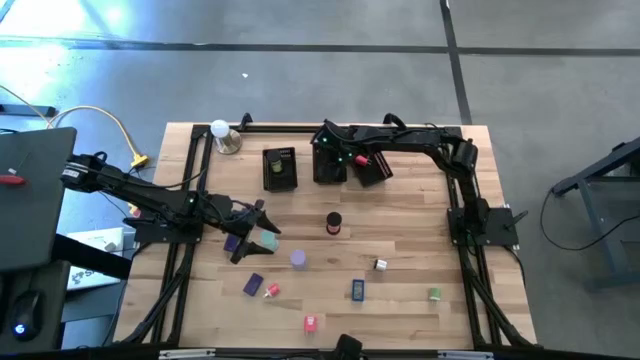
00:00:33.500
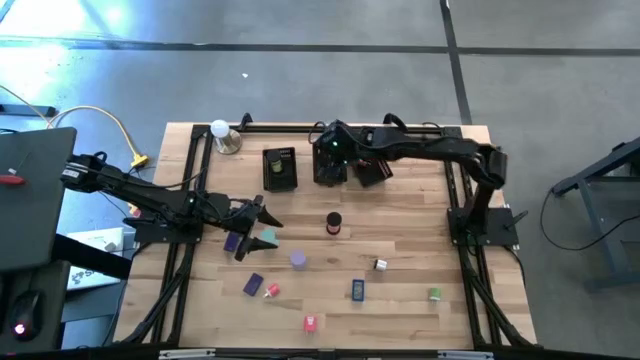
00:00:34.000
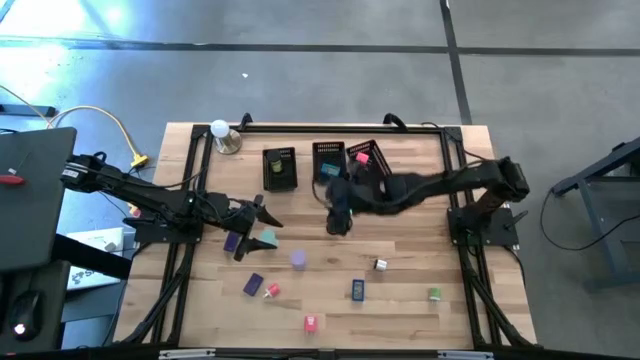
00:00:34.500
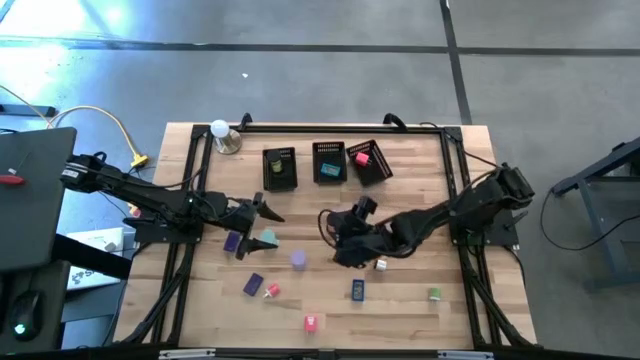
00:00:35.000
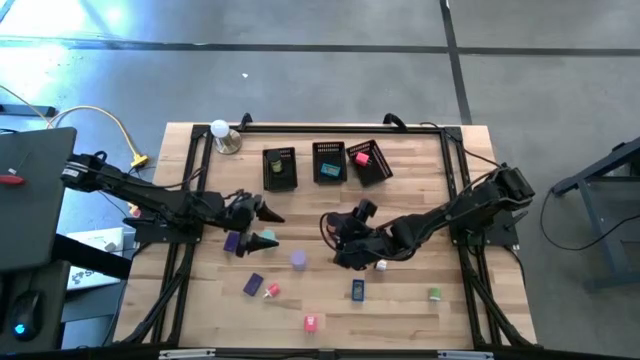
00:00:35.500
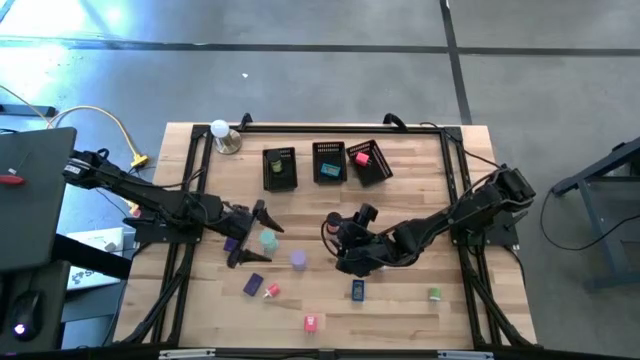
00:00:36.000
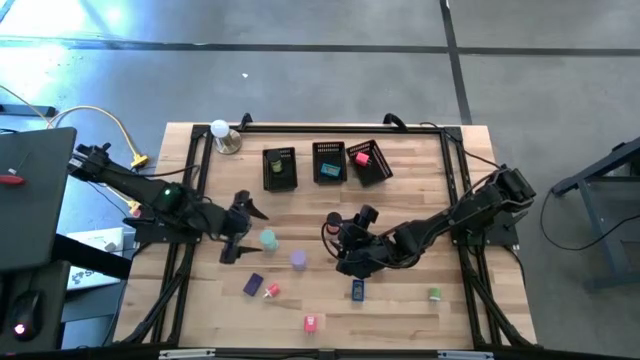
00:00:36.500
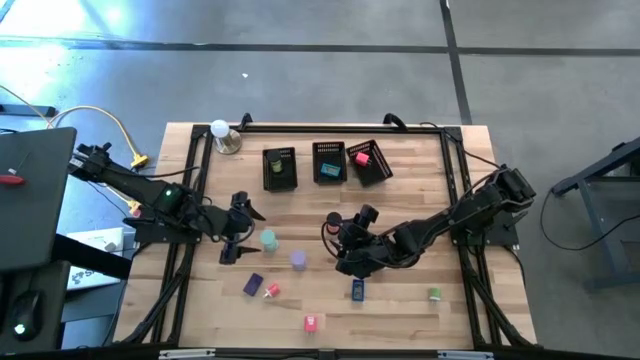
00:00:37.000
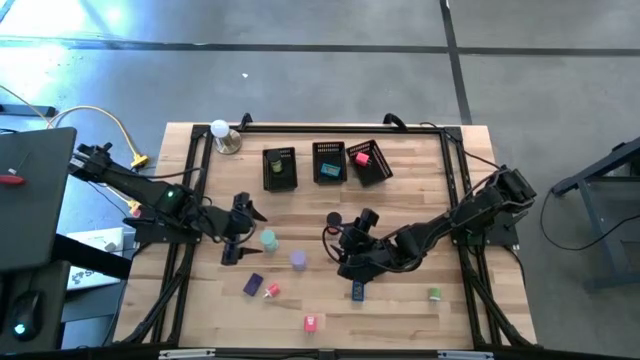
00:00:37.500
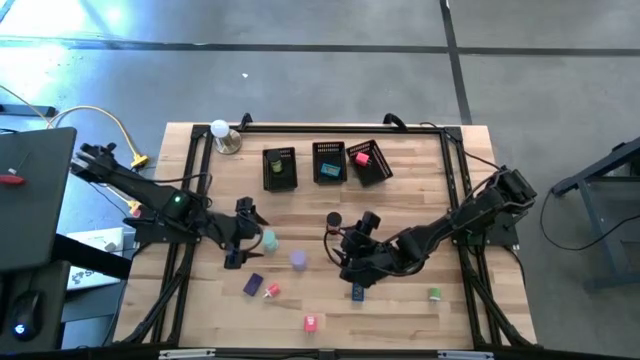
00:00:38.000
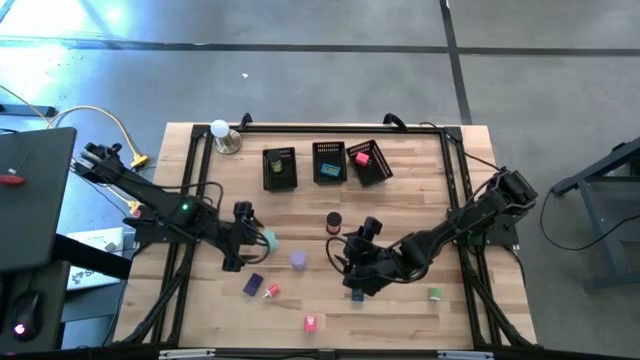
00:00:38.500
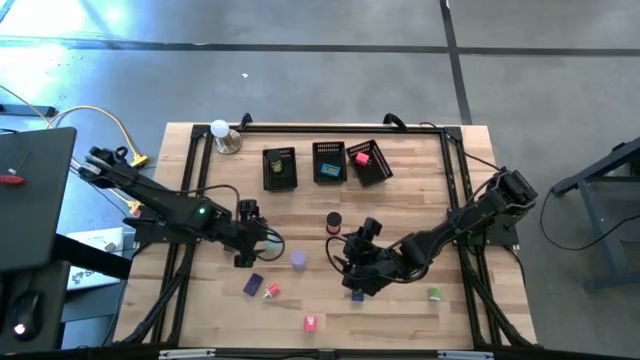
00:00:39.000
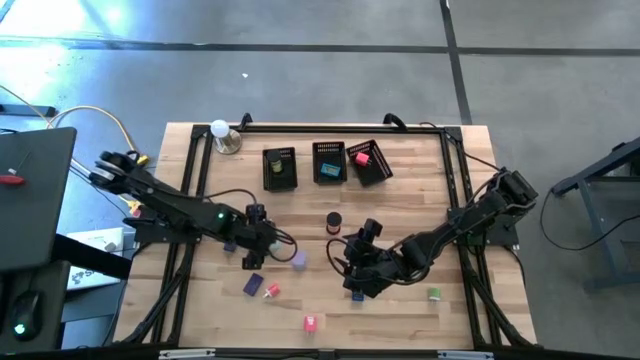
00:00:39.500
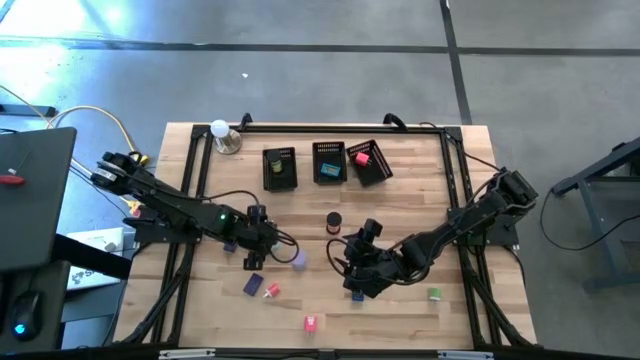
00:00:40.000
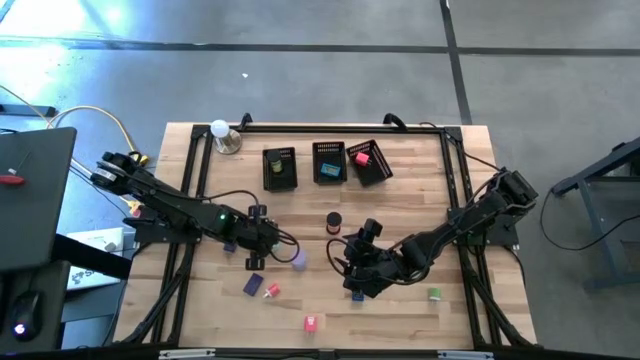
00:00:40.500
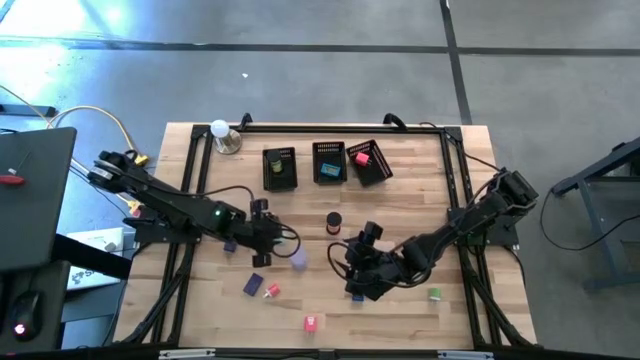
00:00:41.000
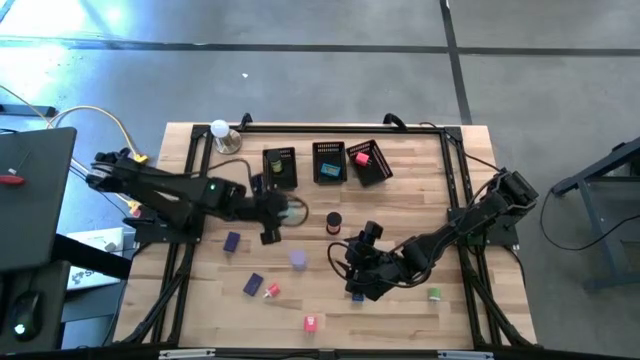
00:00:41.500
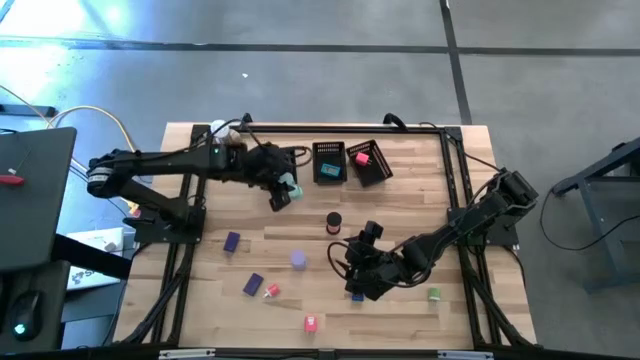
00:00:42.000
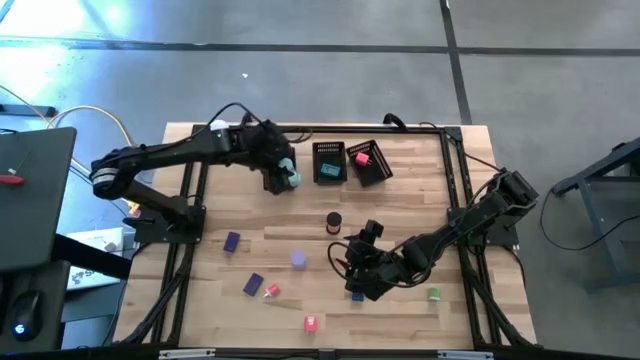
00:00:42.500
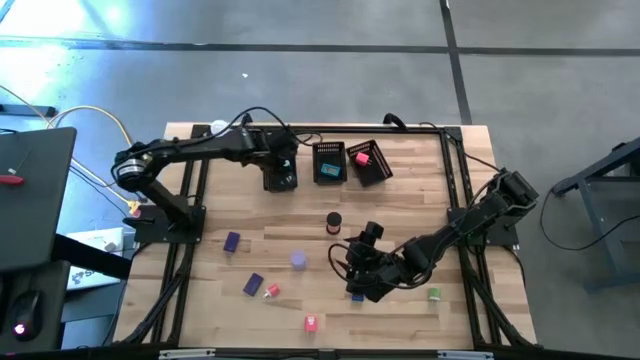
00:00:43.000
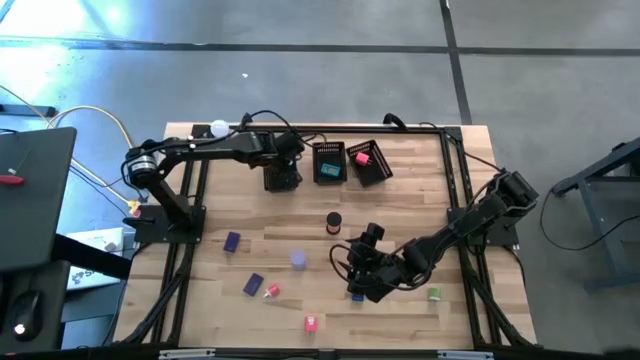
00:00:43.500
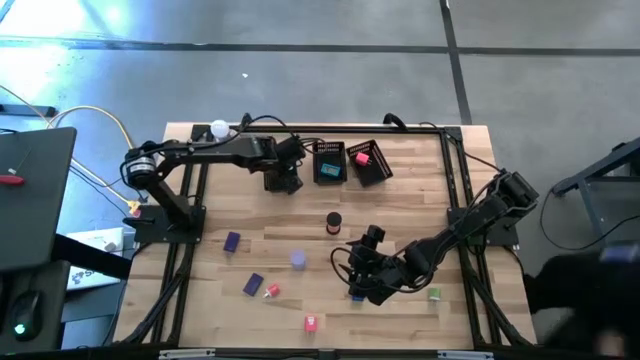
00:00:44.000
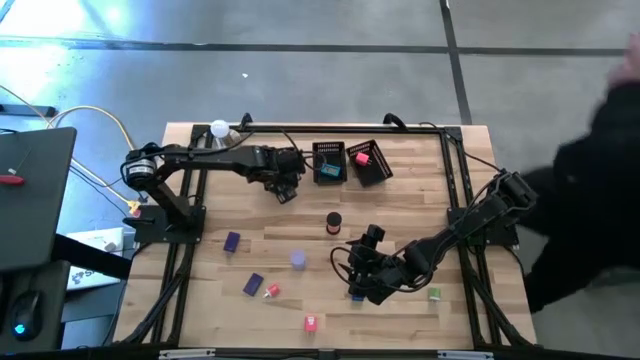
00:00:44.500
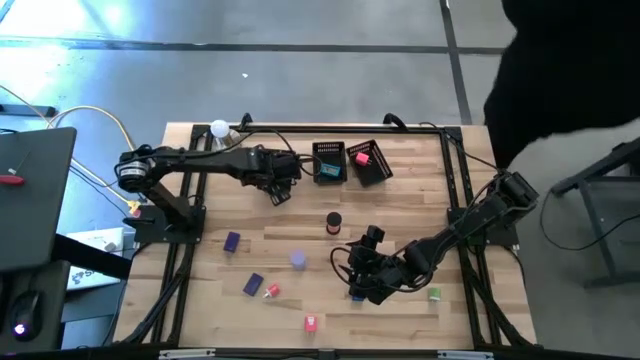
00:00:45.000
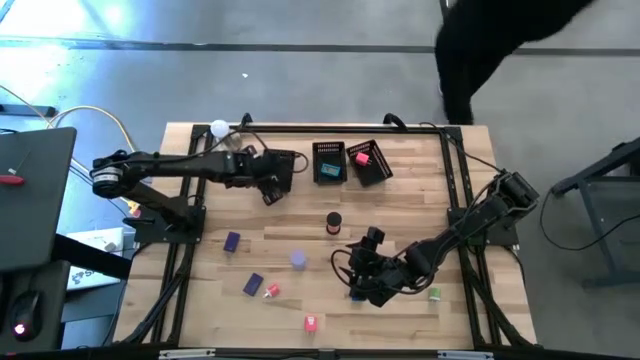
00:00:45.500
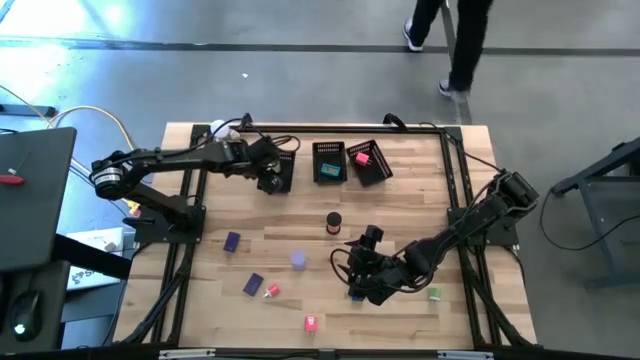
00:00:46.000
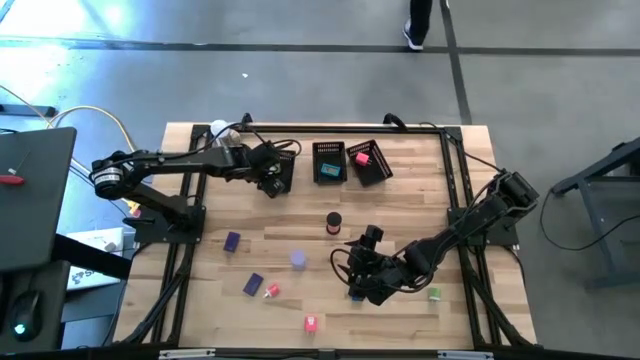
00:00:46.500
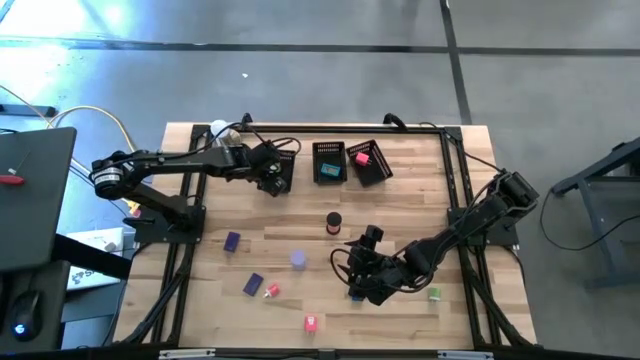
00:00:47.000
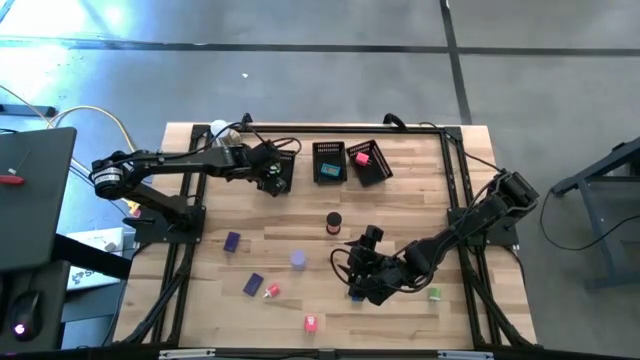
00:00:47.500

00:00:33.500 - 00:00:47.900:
Task: Pick & Place Office items
Put the light blue hourglass into the left black bin

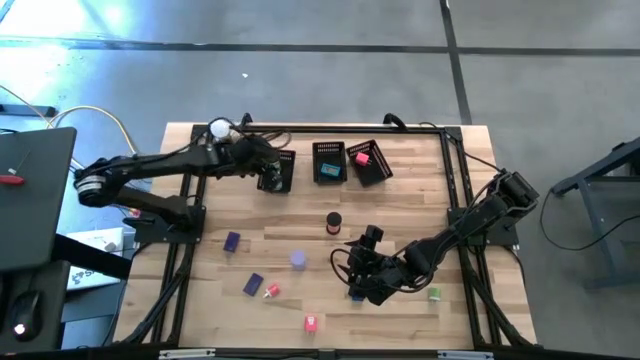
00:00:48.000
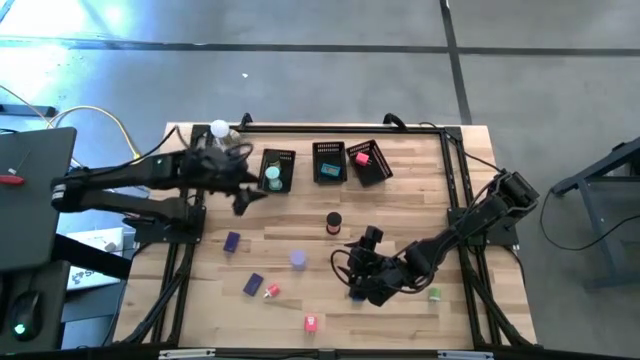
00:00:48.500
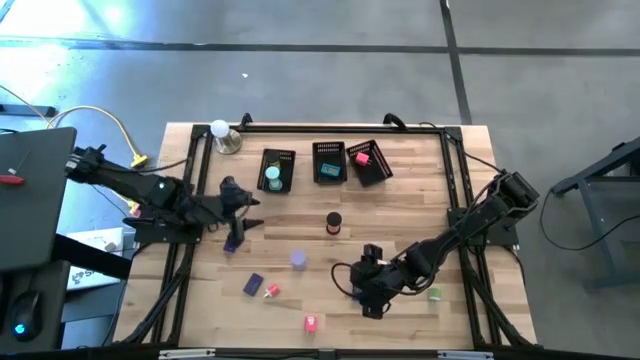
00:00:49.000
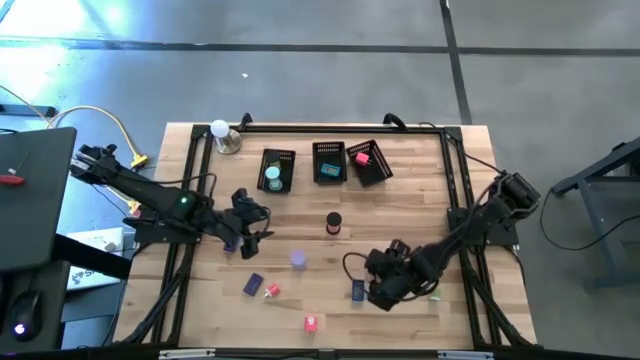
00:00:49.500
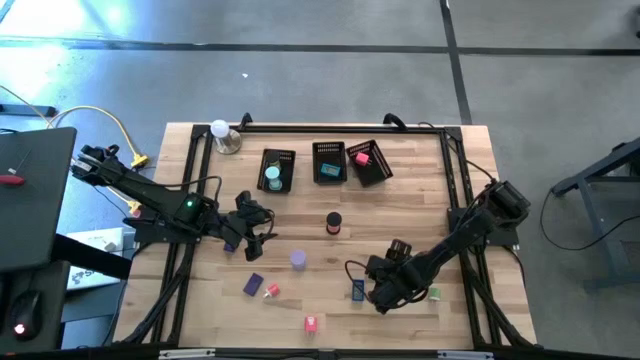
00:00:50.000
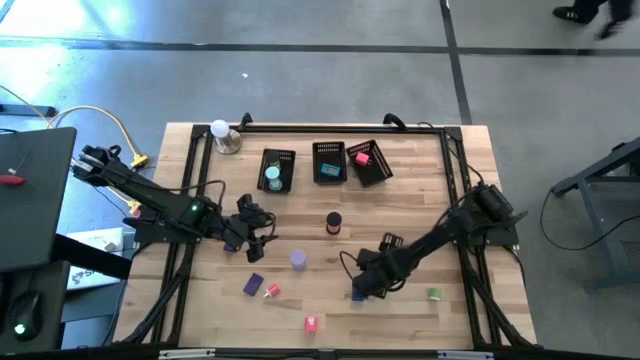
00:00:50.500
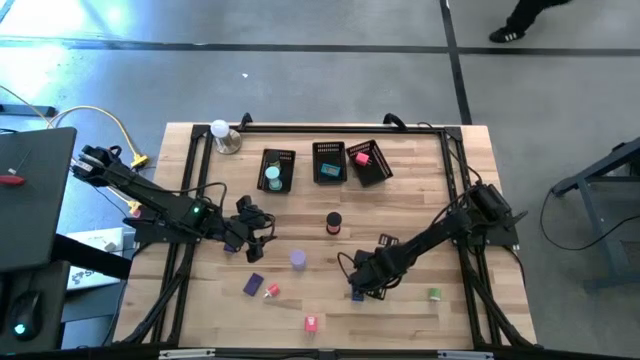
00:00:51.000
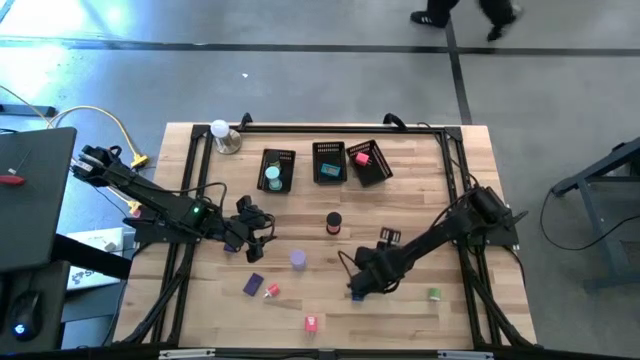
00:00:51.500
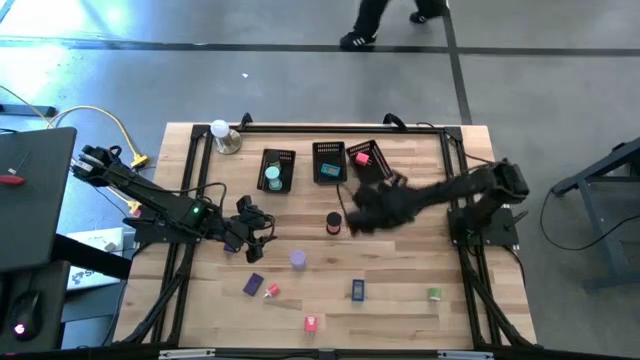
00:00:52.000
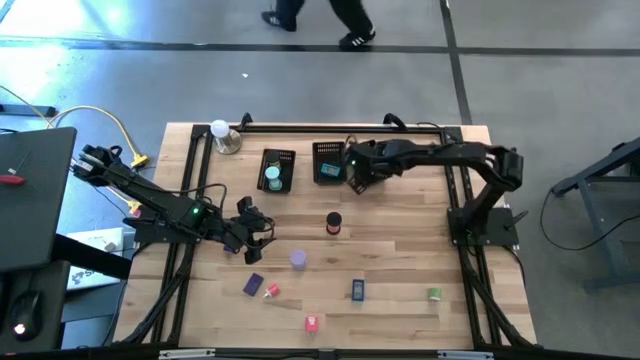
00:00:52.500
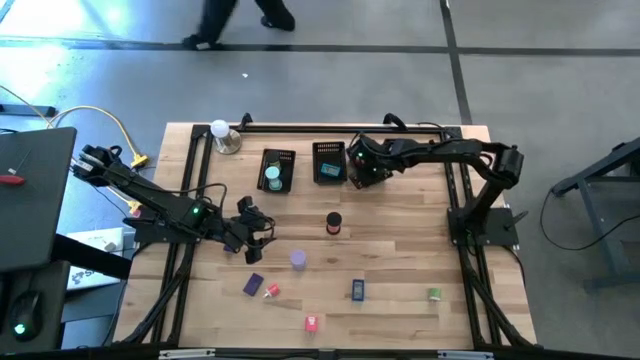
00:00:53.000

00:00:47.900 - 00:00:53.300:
Put the gray charger adapter into the right black bin

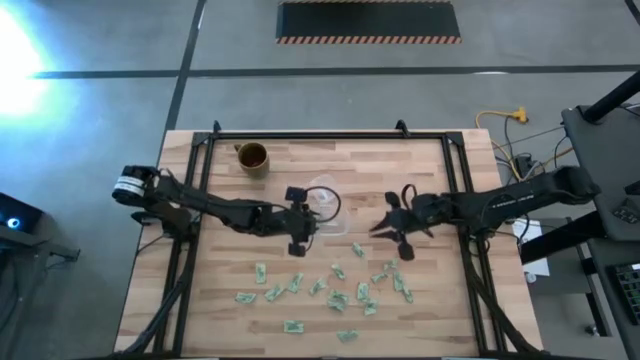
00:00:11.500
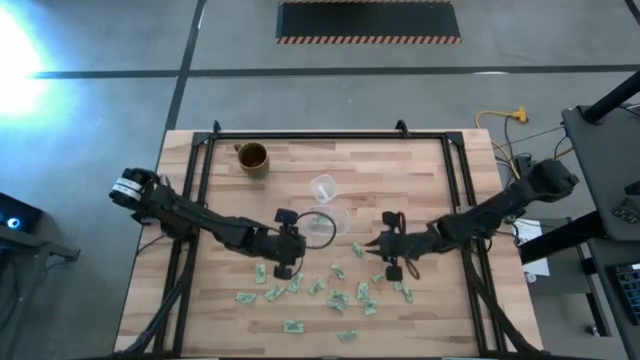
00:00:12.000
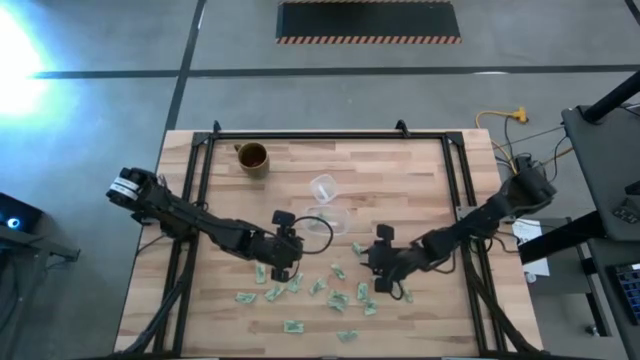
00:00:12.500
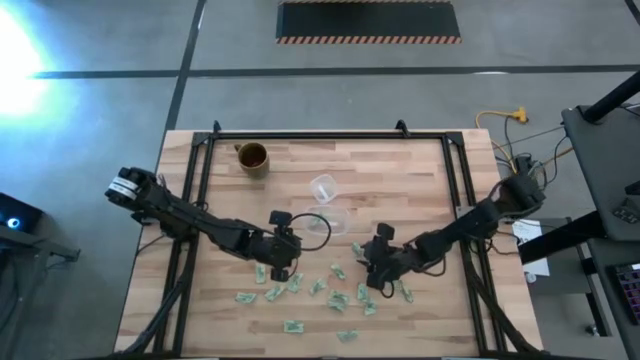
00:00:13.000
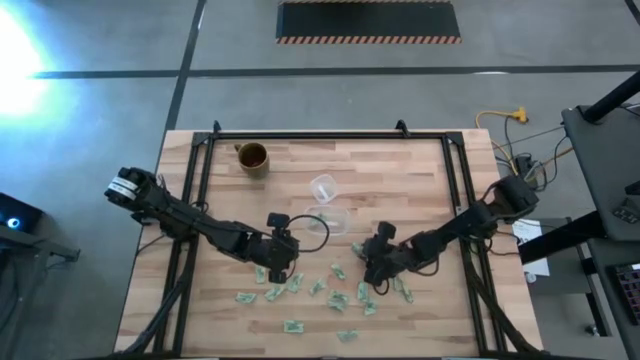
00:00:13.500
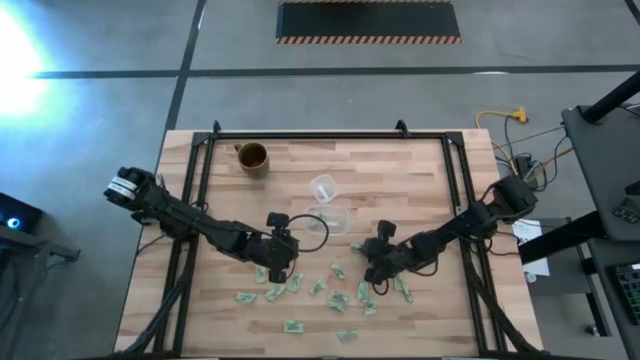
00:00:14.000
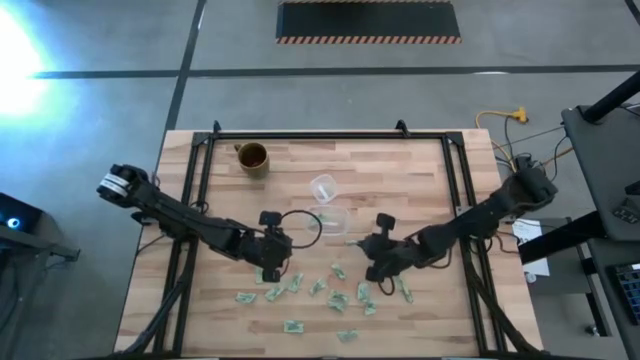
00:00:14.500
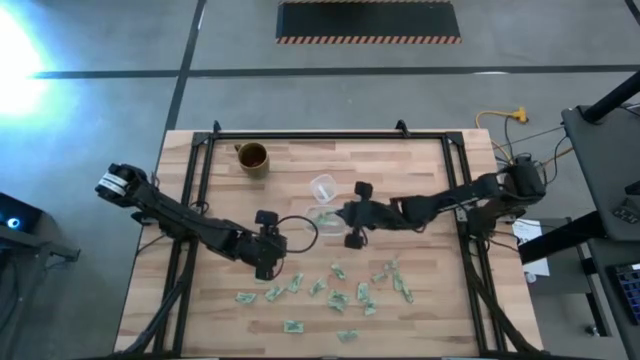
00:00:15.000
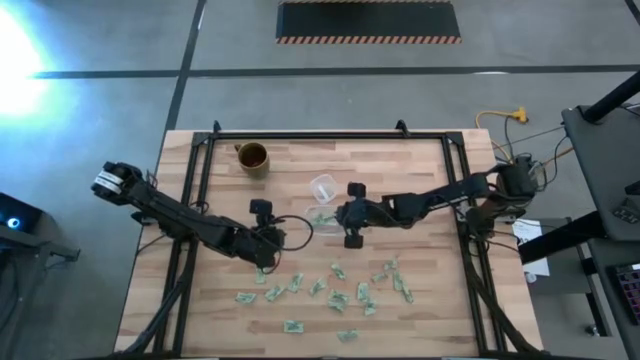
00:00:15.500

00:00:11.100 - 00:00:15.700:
Task: Pick and place Stevia / Truvia into bins
Put the stevia packet into the bottom transparent container
